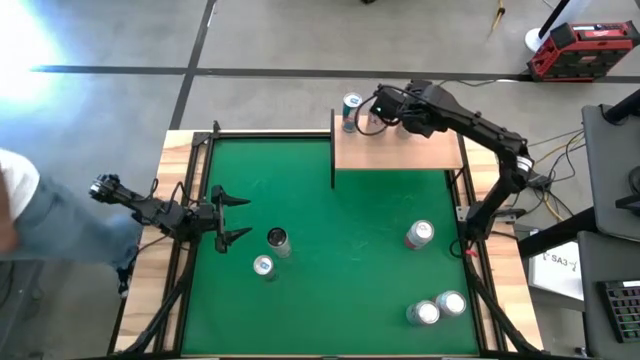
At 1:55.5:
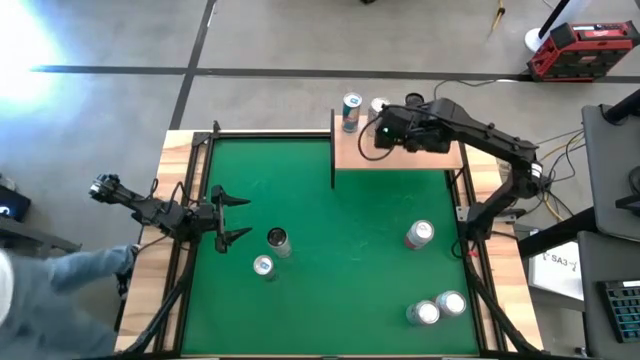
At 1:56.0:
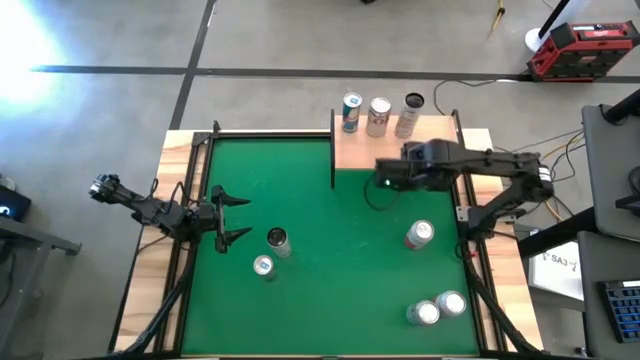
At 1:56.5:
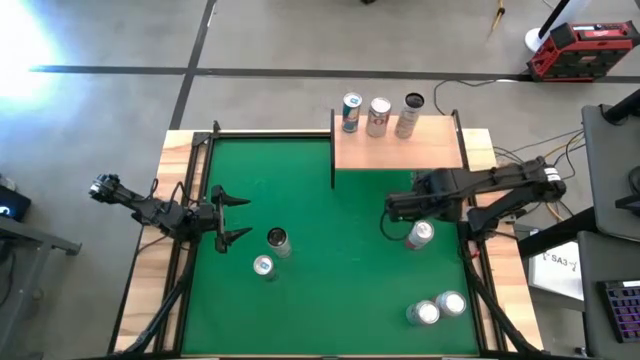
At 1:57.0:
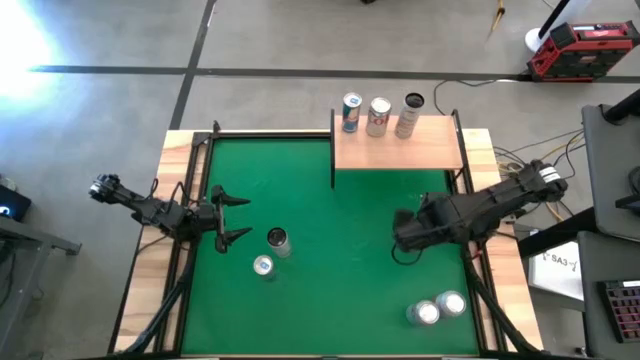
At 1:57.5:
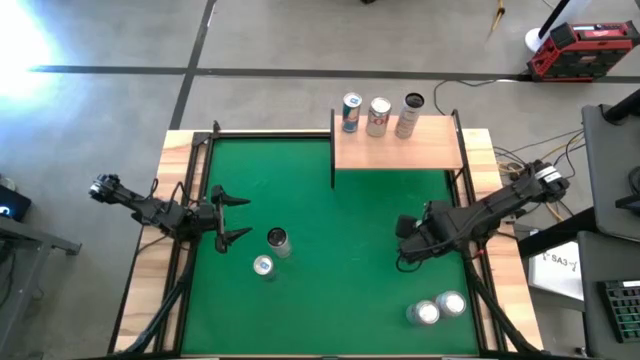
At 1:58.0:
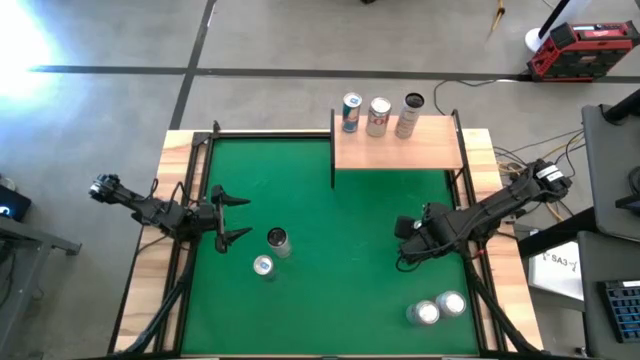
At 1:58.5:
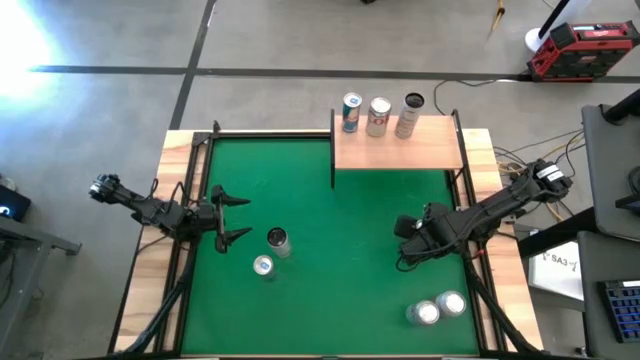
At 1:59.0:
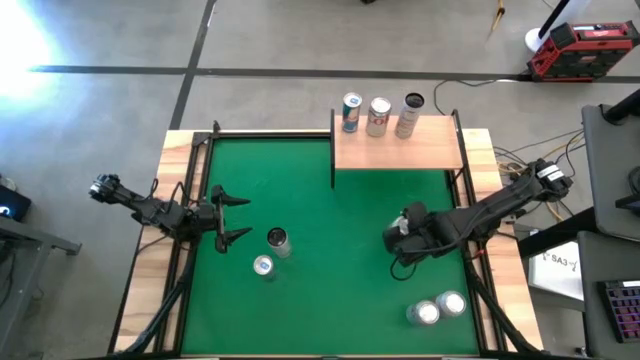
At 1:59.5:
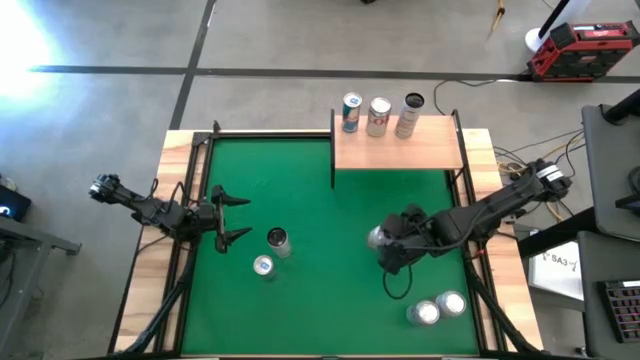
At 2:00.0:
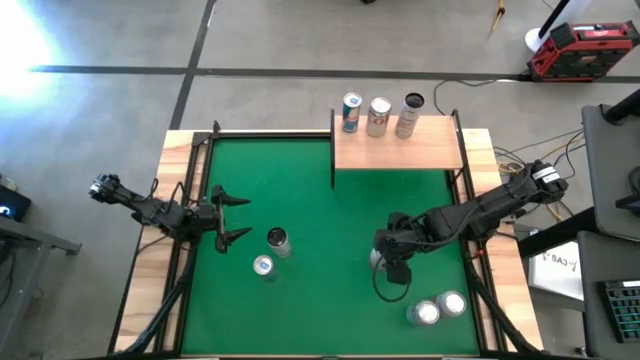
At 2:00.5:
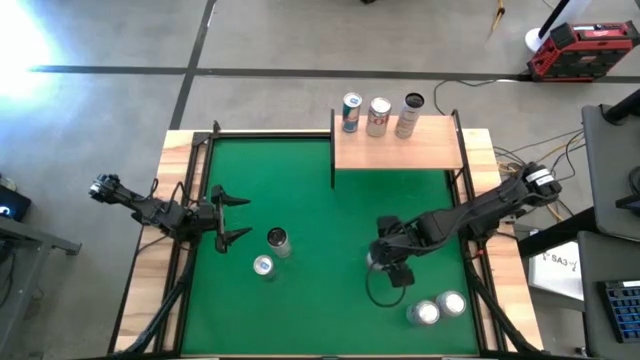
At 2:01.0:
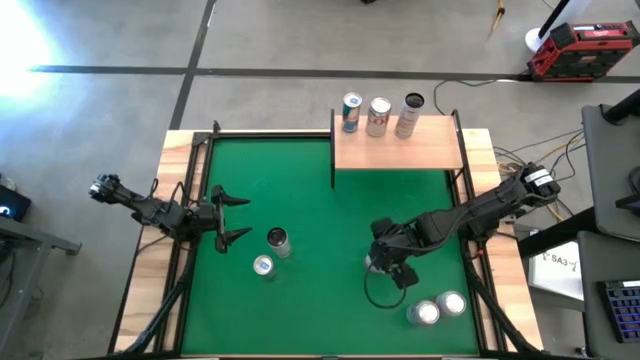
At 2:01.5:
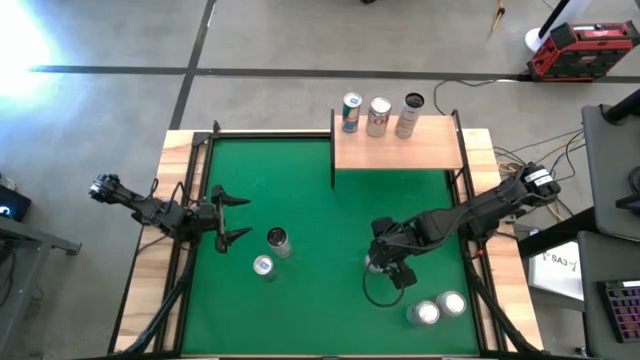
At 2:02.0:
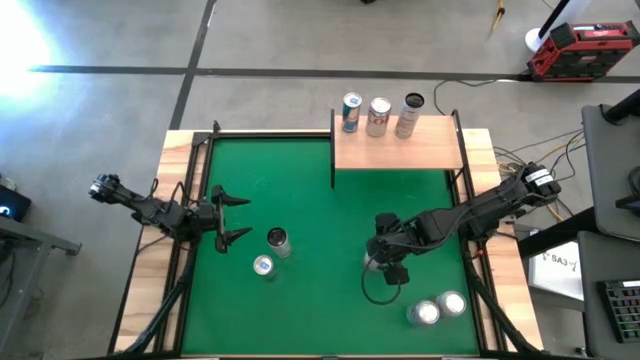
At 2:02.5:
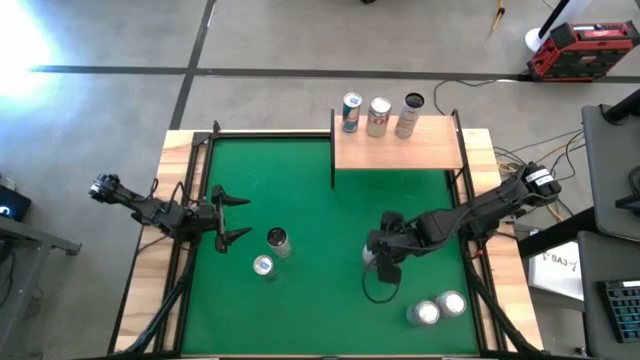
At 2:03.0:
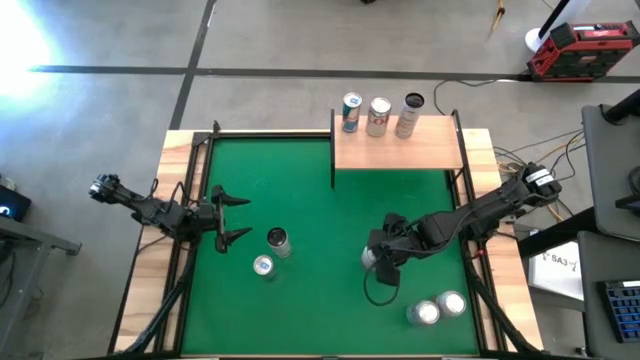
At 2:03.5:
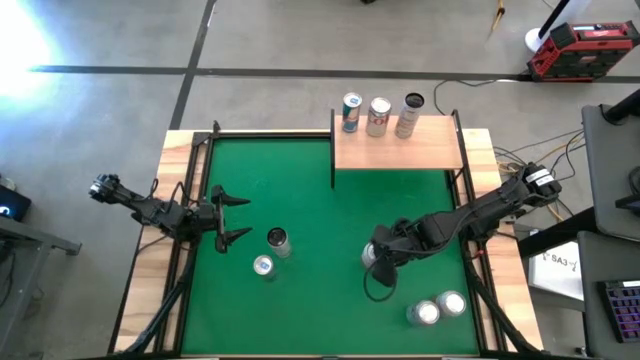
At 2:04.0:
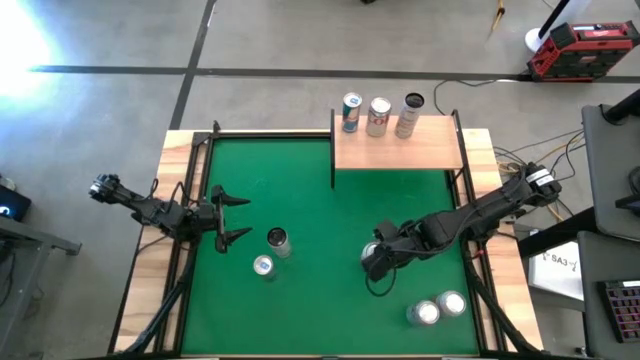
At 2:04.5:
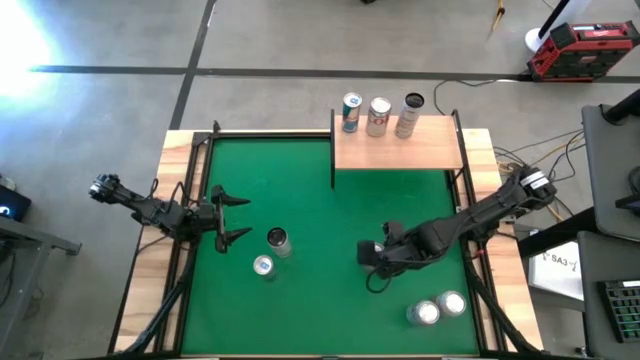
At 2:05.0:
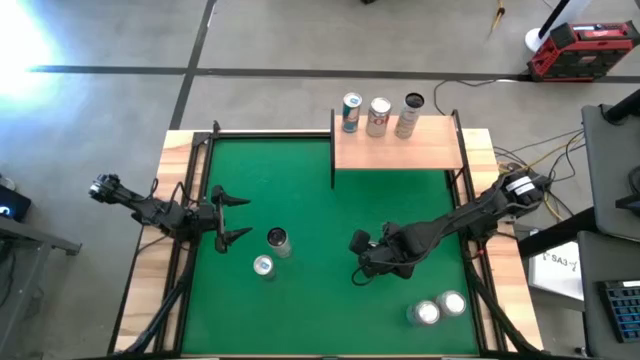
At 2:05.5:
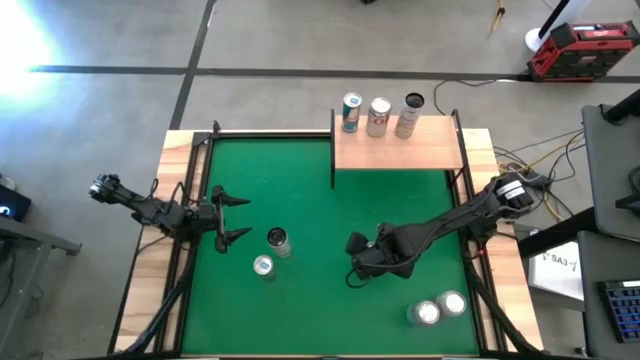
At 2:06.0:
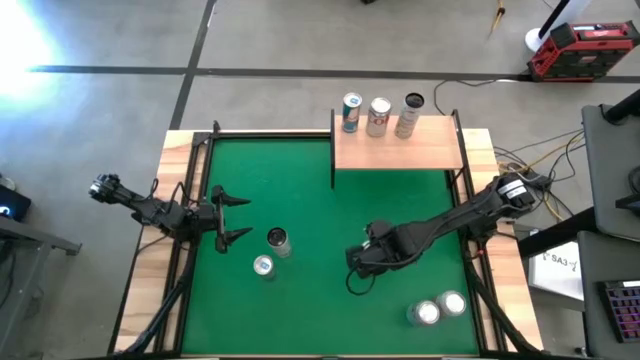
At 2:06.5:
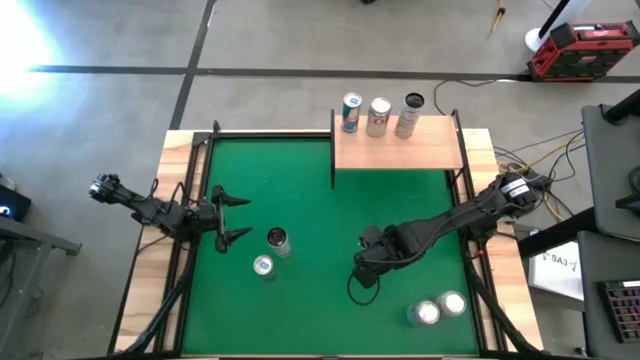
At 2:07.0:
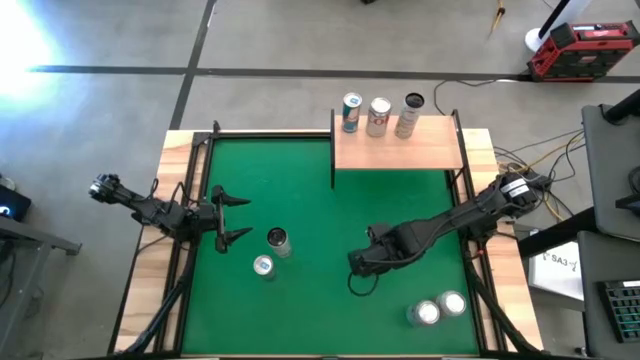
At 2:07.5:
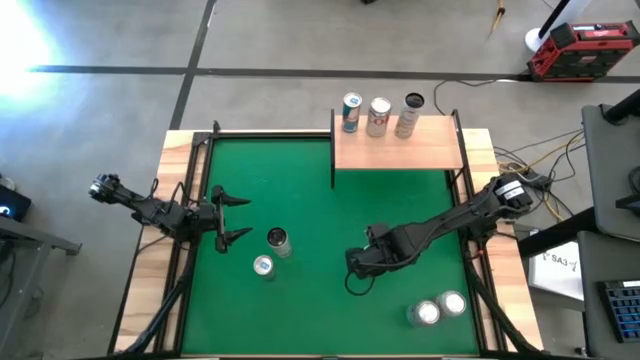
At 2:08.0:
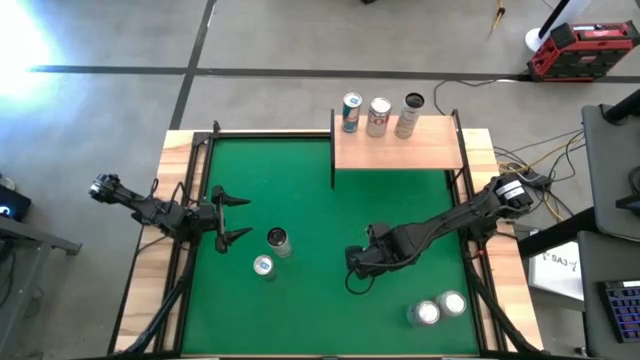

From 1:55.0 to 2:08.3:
Task: Place canned beverage on shelf
Put the top pink-white soda can on the shelf

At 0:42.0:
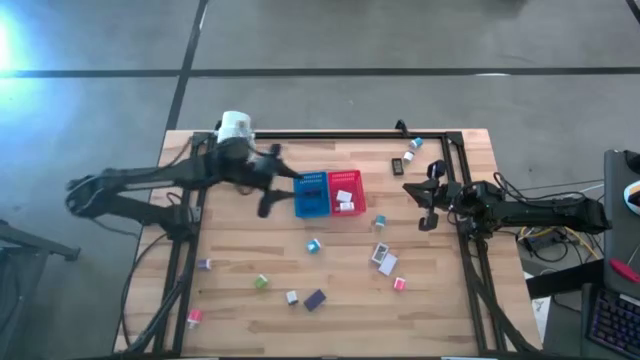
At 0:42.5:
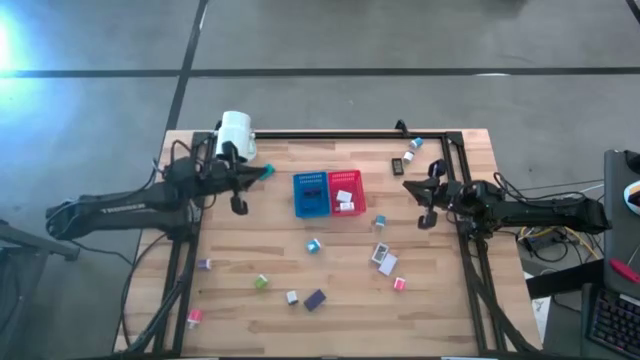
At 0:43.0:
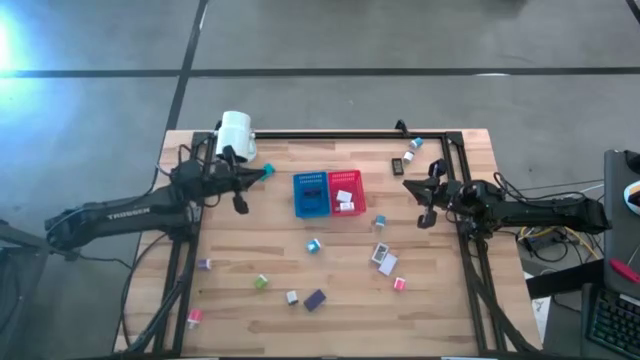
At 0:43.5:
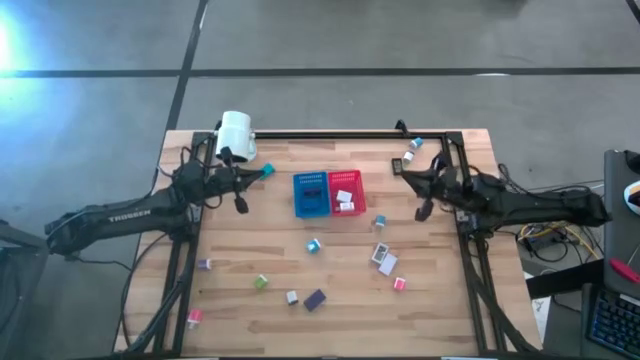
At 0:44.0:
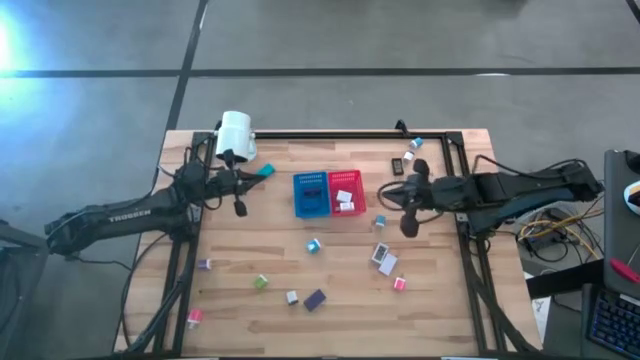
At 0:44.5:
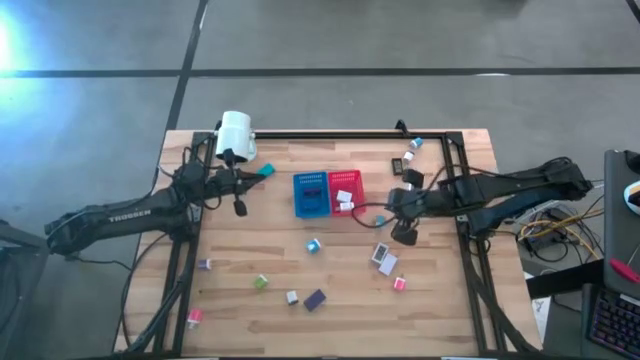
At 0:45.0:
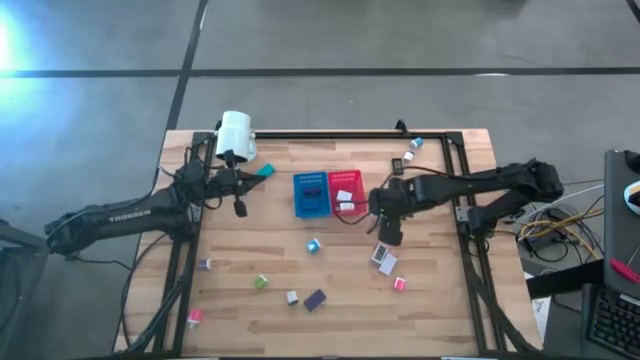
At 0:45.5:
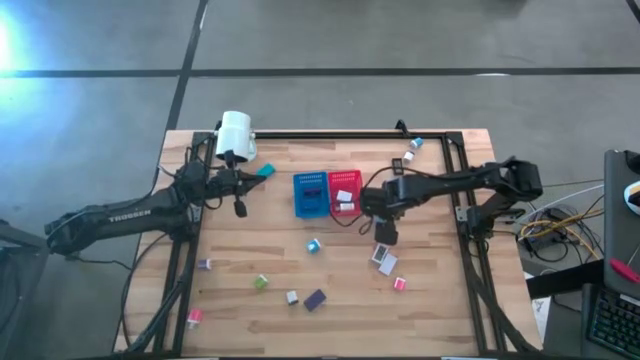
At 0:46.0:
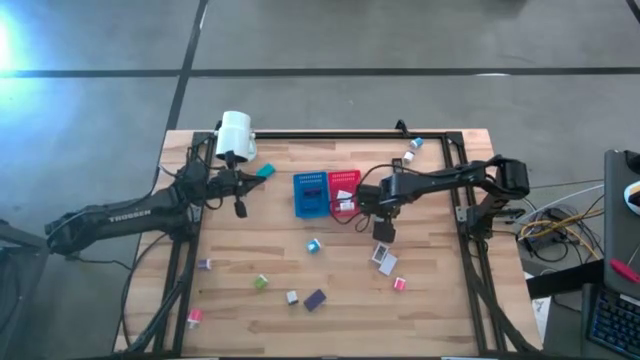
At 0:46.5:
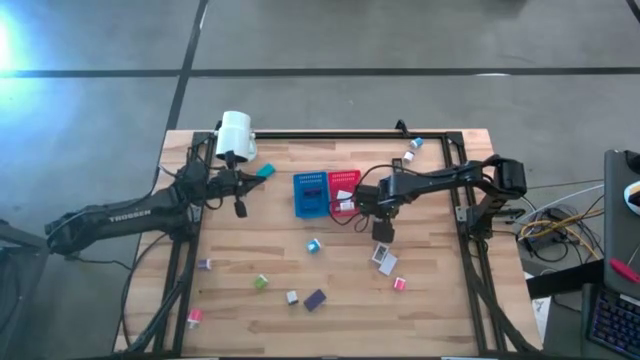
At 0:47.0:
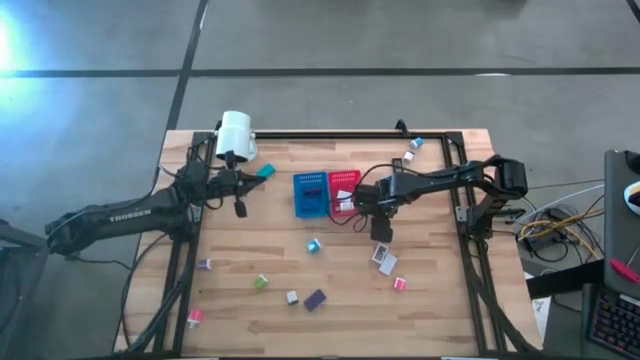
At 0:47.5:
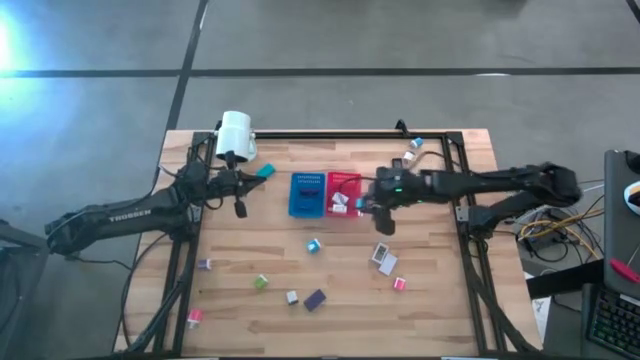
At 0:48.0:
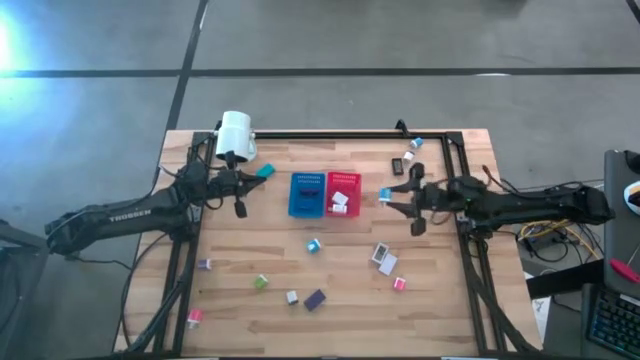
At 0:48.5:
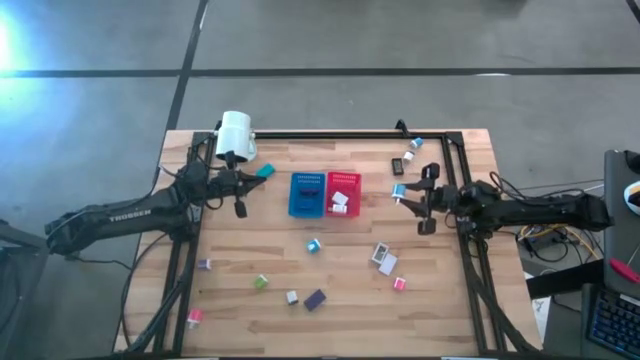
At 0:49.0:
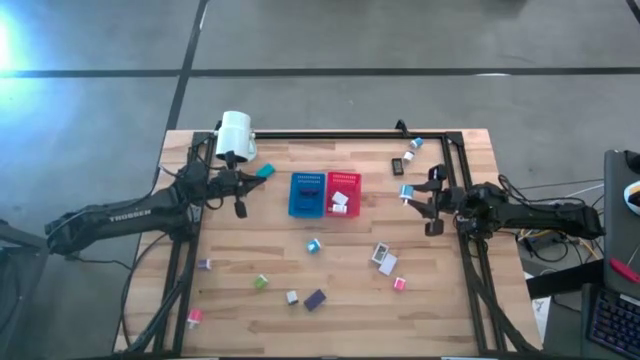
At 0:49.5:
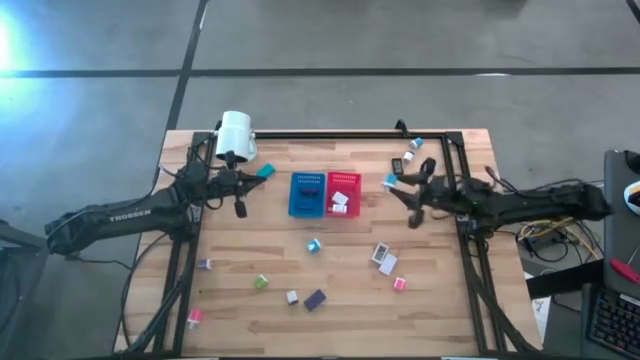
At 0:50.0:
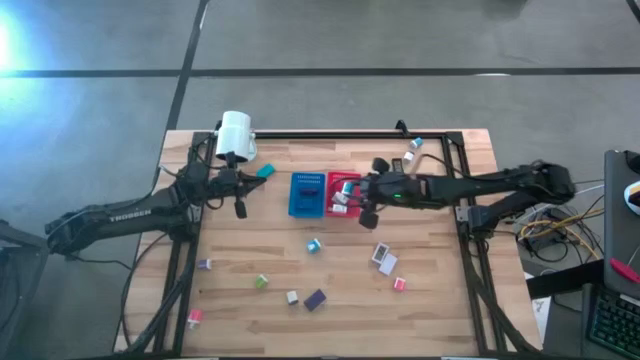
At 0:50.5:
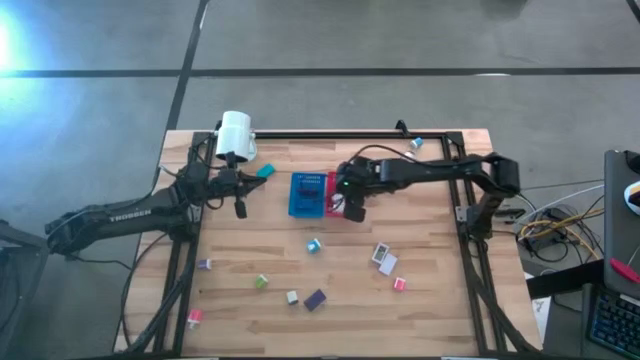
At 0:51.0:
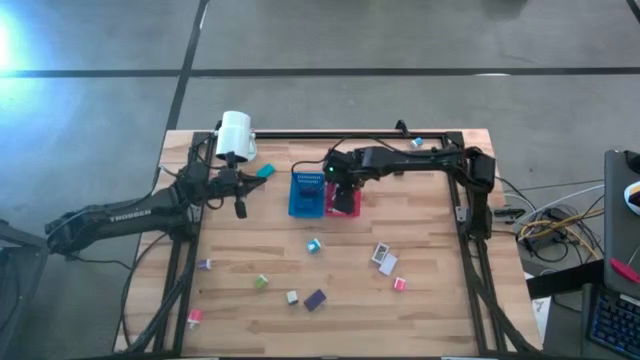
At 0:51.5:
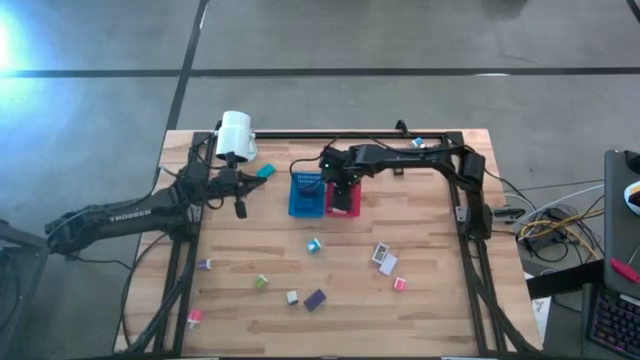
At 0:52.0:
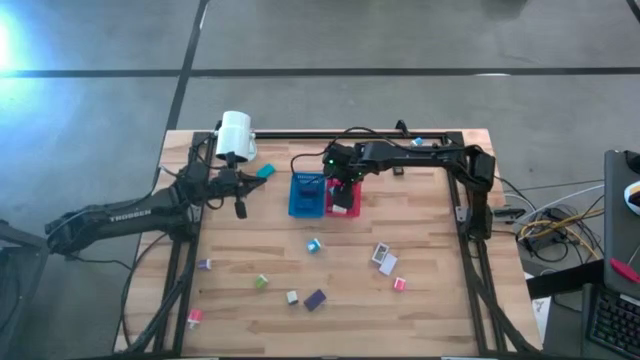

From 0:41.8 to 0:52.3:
Task: Pick & Place Office items
Put the middle light blue charger adapter into the red bin
